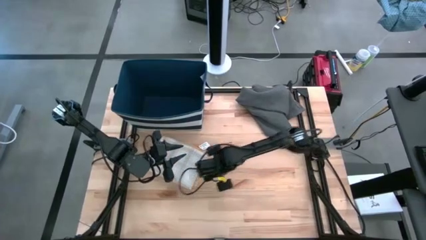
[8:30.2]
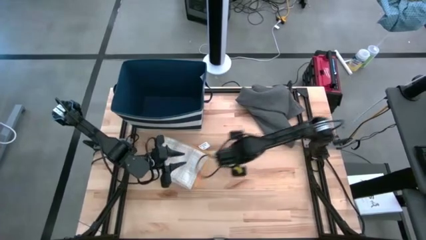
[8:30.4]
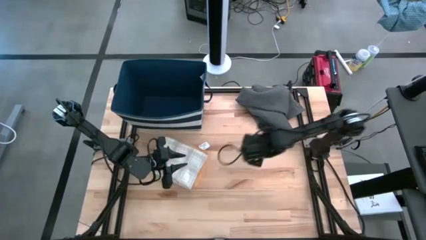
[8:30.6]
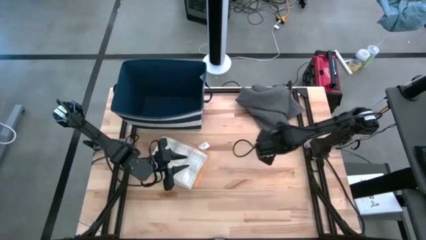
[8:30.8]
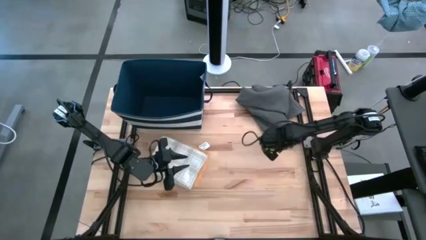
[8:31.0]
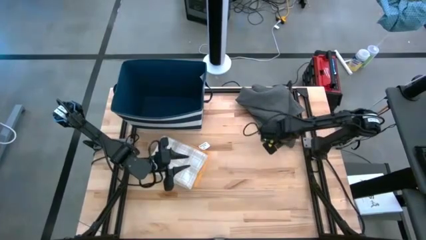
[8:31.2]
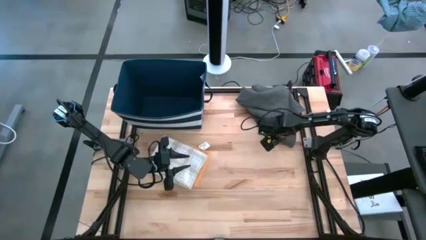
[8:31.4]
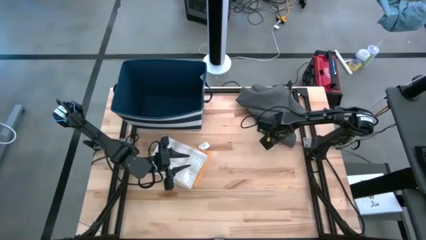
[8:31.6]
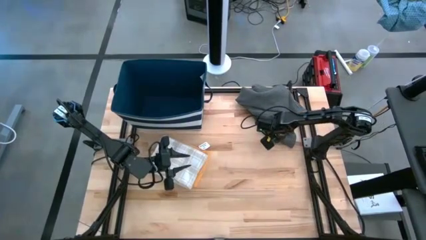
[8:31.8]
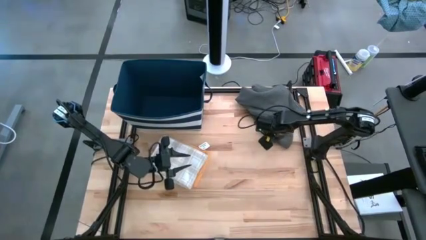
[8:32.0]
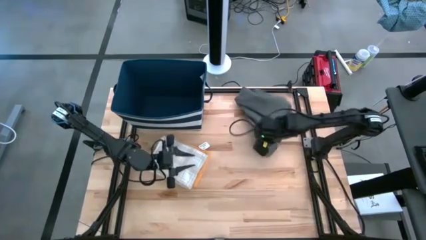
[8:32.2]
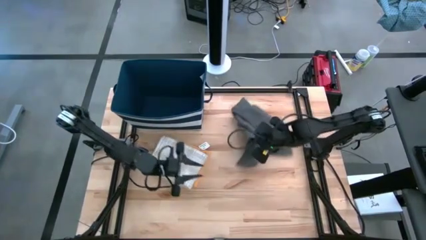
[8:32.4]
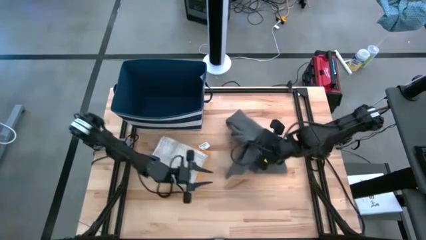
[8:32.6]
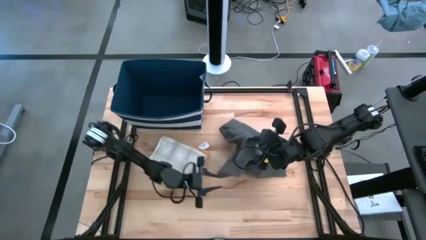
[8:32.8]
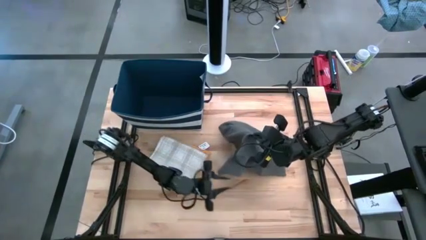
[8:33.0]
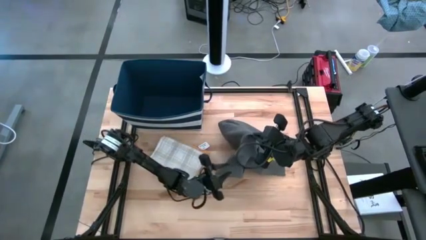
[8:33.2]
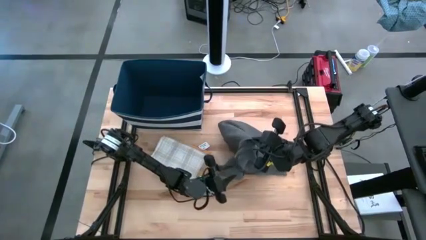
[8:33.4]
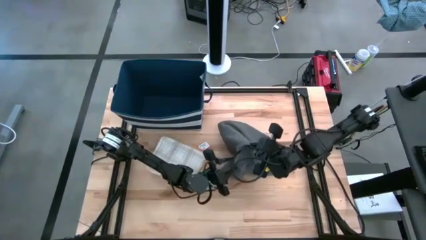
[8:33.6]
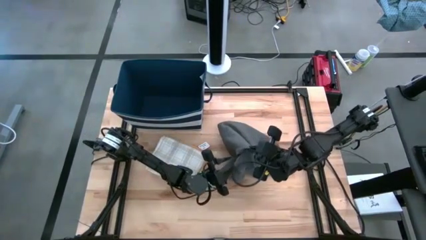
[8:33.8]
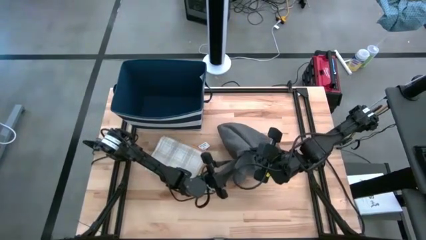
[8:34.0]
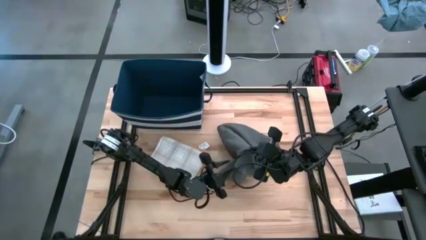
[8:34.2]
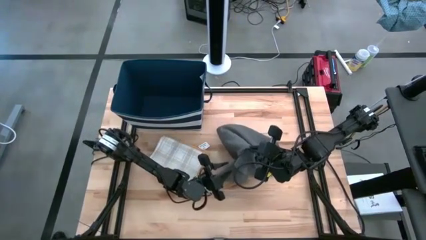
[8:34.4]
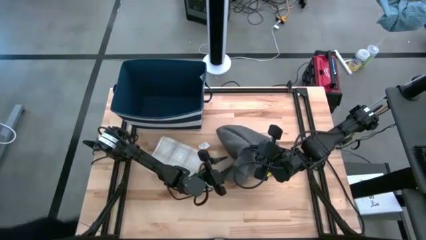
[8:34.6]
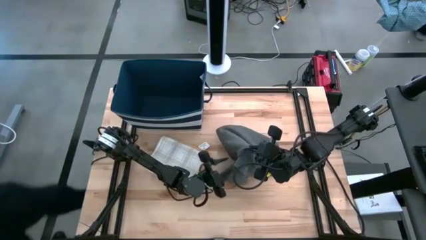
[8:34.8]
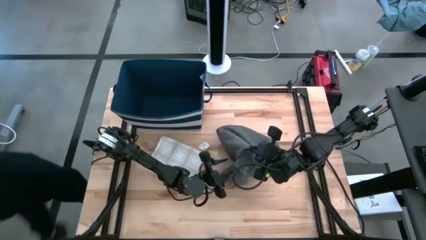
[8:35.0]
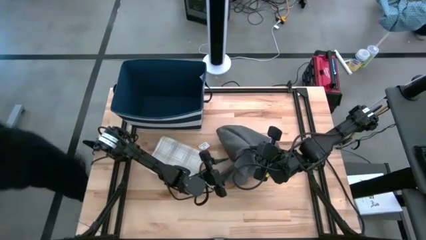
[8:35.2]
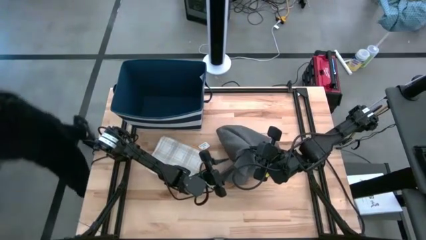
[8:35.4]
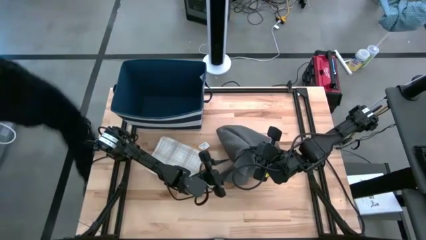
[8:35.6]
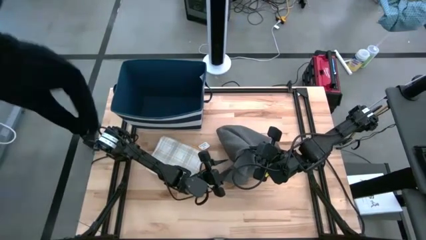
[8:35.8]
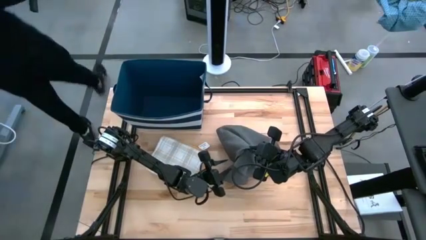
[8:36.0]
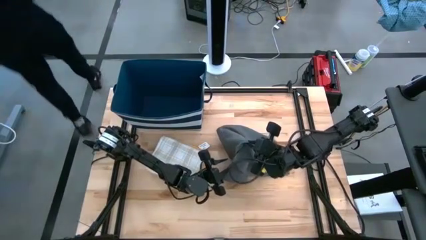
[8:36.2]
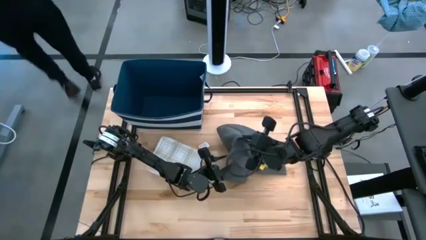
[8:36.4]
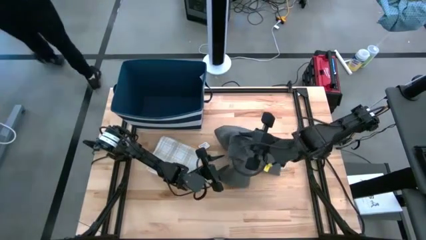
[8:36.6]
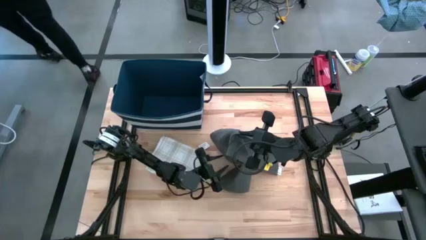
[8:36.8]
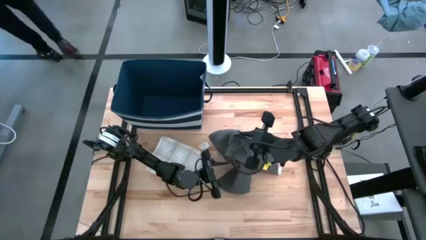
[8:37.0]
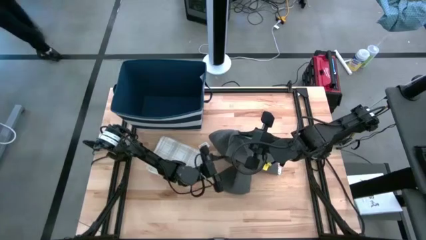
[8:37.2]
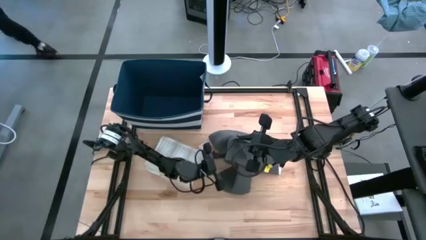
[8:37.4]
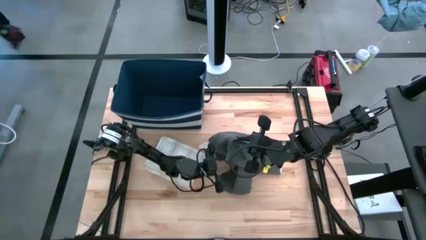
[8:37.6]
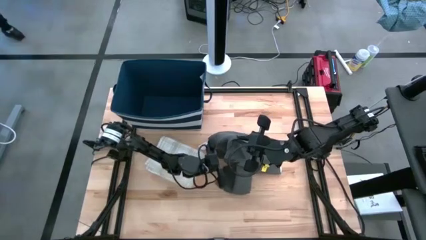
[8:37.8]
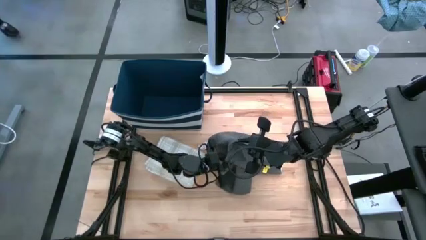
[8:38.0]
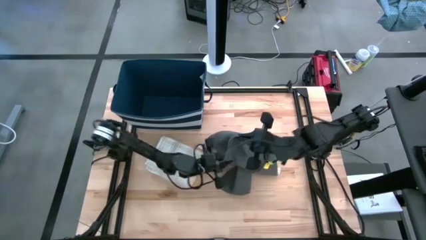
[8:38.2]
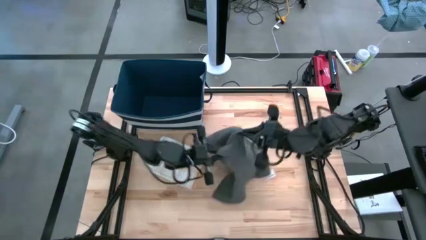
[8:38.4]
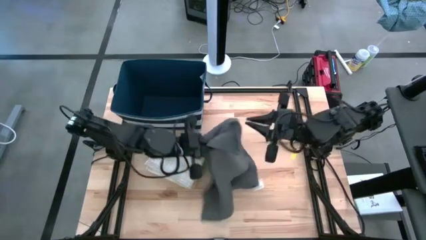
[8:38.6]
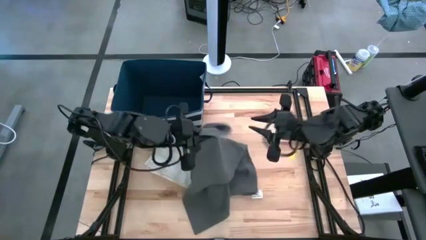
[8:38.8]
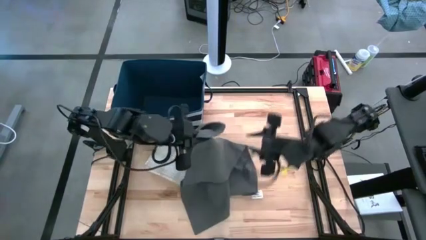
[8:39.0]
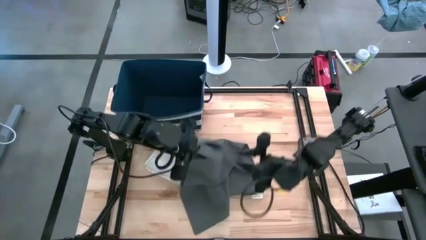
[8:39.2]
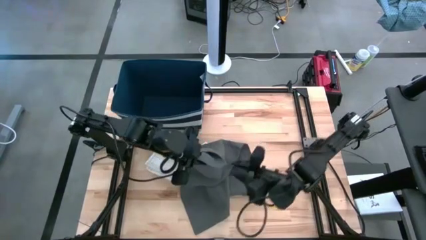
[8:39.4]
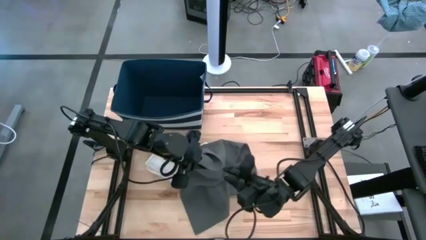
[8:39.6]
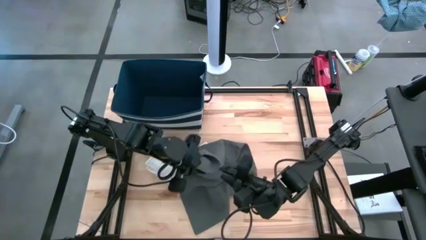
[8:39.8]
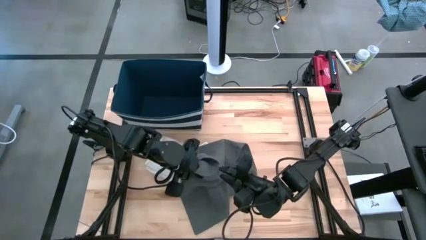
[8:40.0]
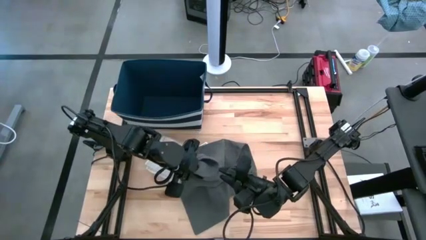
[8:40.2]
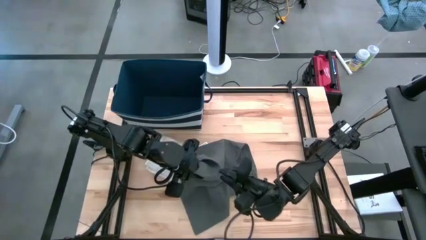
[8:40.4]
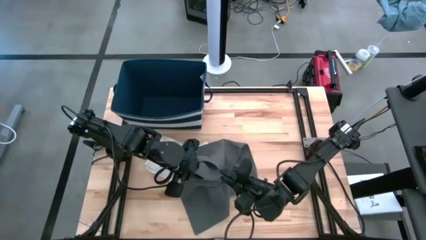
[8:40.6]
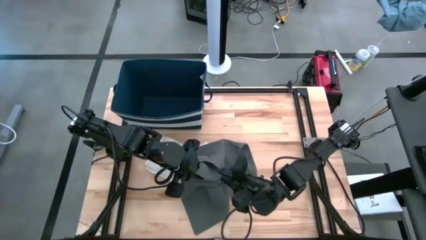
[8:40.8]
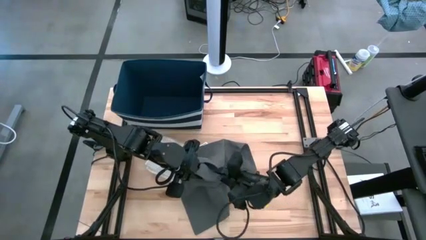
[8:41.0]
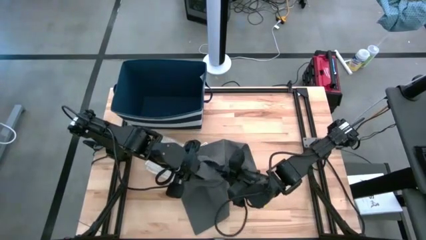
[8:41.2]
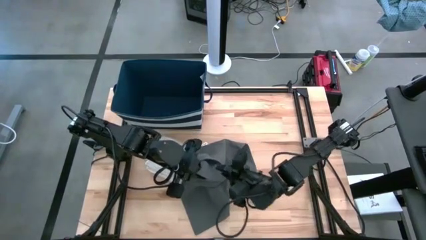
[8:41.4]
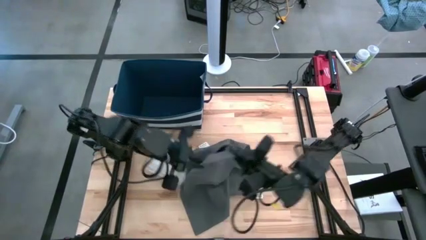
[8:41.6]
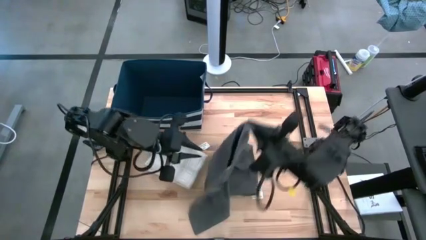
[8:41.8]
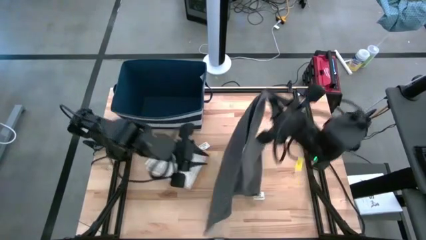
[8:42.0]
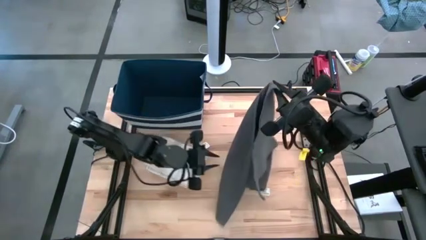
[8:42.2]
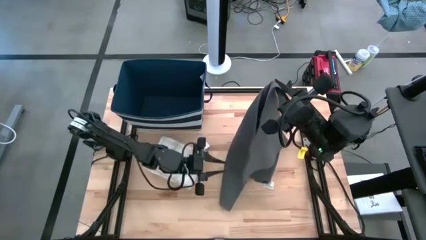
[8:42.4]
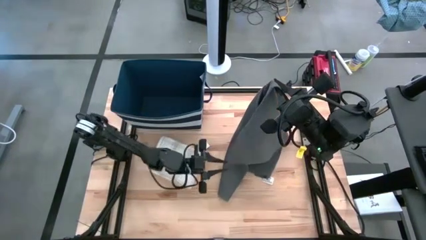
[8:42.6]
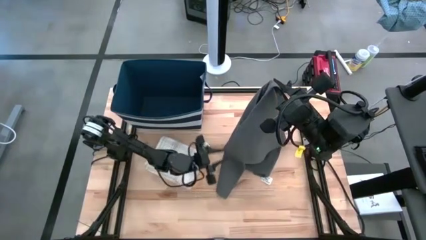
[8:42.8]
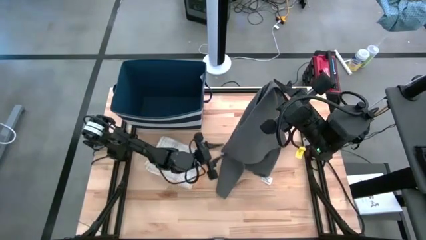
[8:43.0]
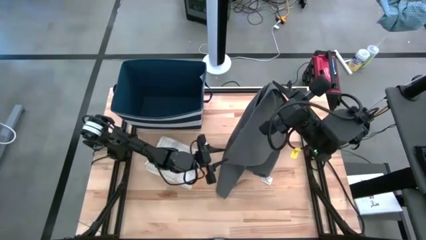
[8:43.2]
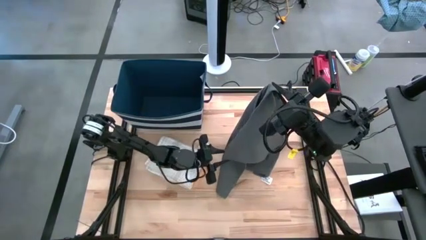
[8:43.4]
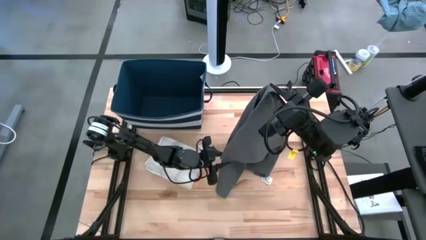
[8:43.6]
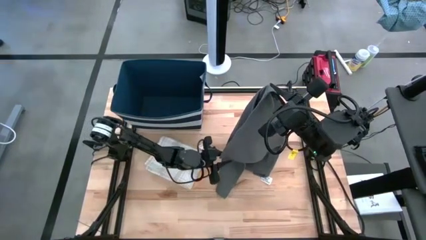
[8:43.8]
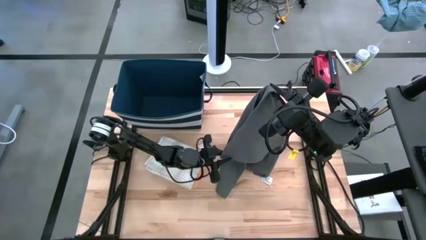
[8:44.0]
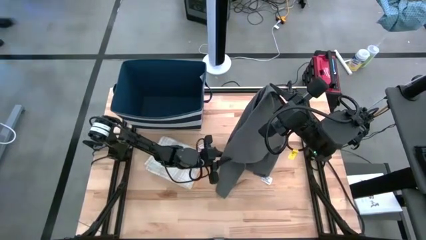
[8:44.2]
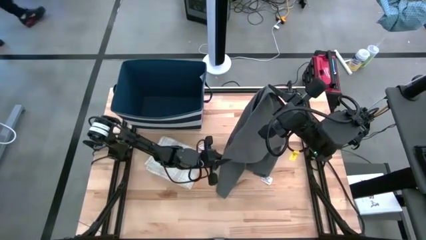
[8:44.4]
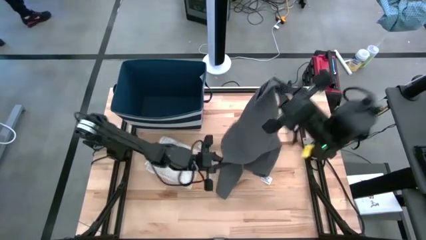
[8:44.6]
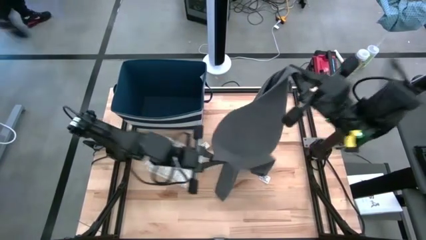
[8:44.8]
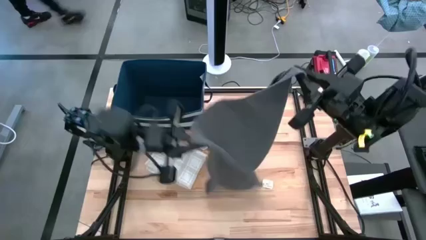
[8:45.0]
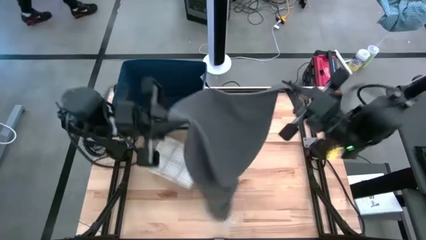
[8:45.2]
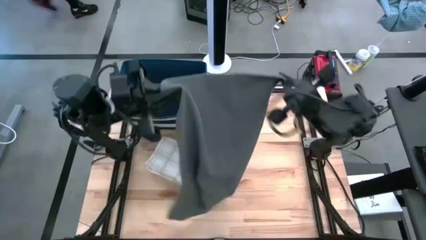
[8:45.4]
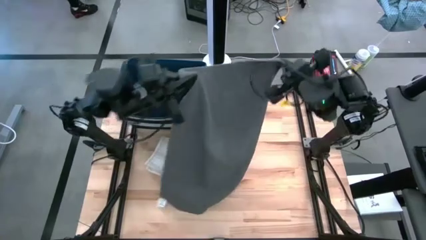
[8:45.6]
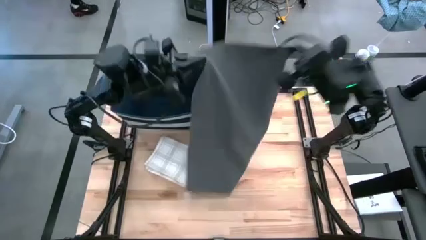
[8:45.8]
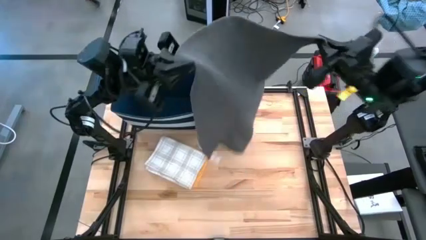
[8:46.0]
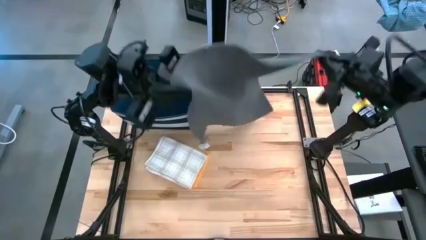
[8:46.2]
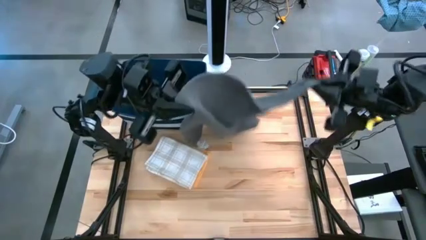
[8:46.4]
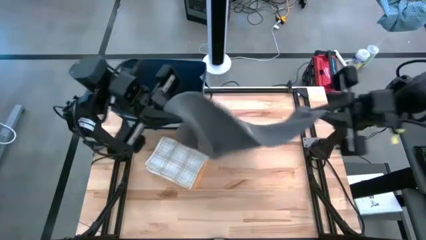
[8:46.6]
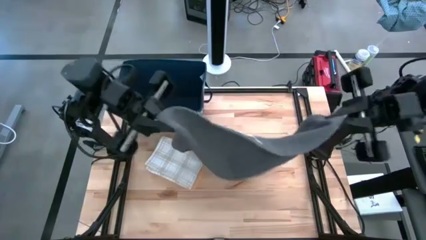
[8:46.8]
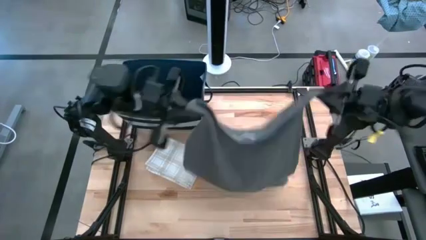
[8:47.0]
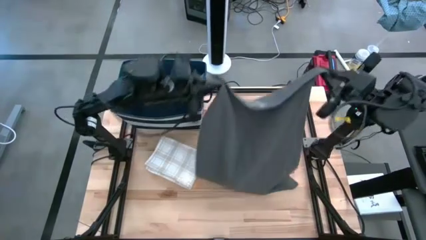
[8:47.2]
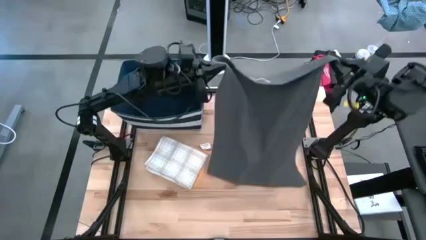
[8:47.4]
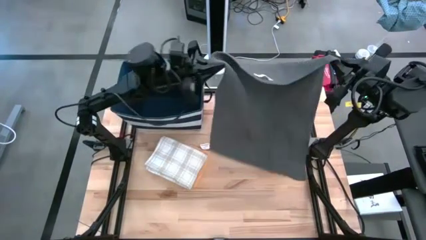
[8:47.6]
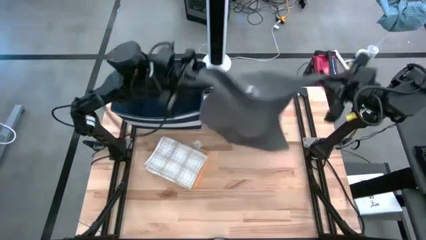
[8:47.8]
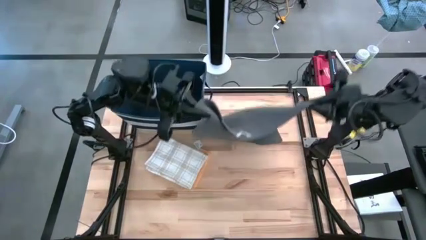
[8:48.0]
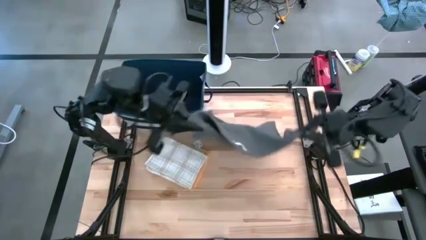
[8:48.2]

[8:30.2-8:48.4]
Task: Fold towel
Fold the gray kitchen towel
